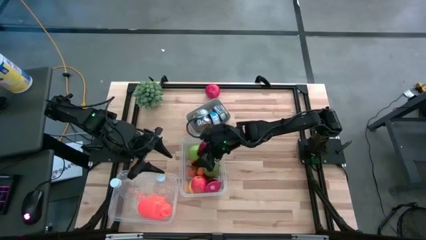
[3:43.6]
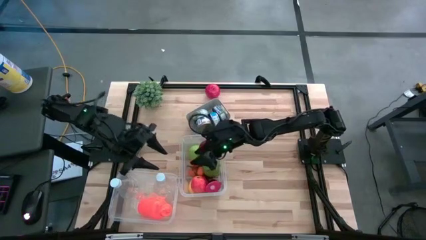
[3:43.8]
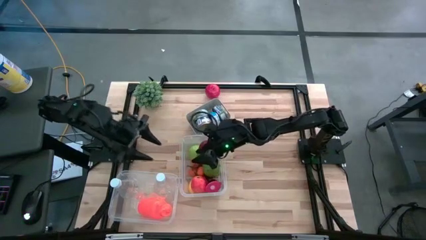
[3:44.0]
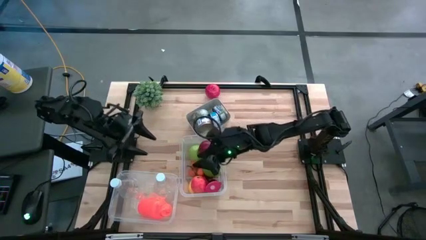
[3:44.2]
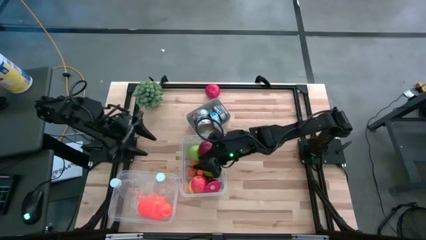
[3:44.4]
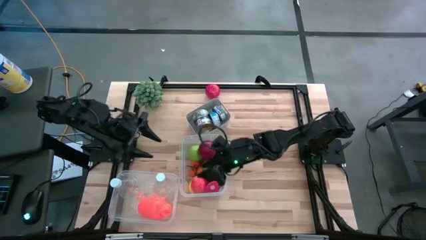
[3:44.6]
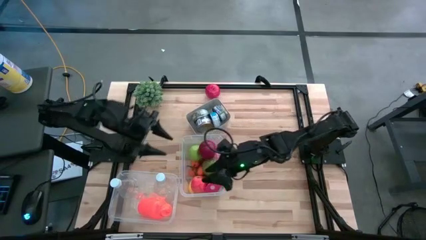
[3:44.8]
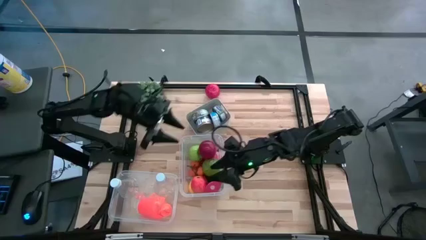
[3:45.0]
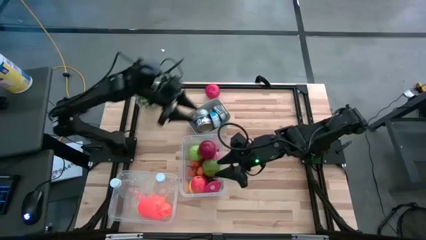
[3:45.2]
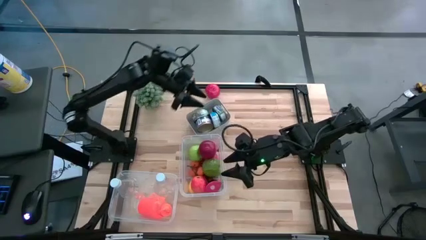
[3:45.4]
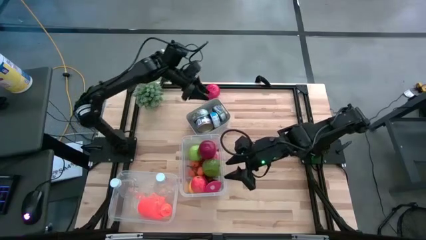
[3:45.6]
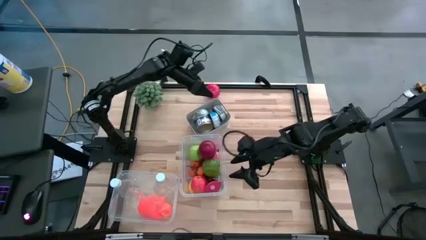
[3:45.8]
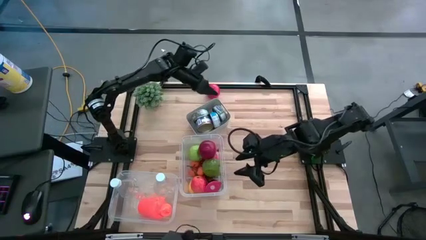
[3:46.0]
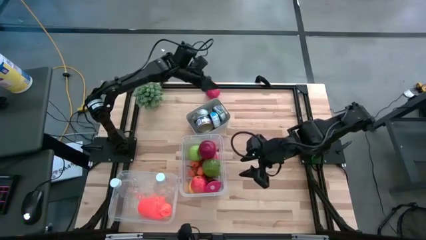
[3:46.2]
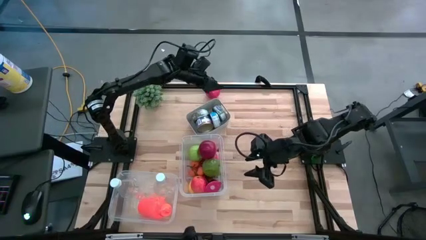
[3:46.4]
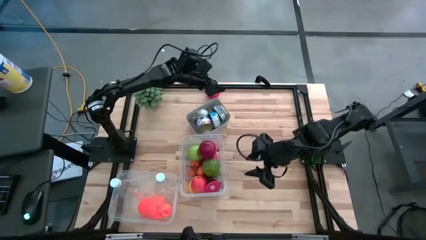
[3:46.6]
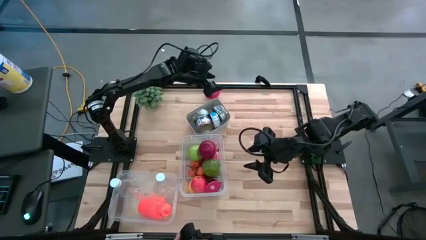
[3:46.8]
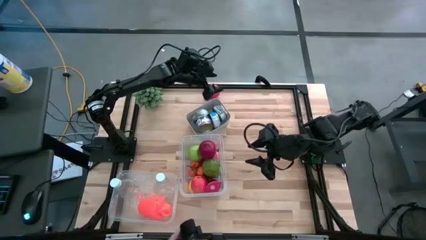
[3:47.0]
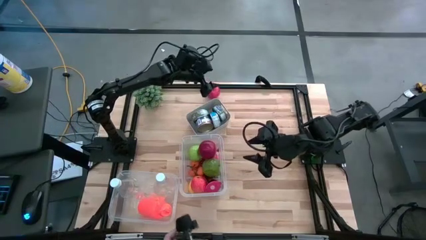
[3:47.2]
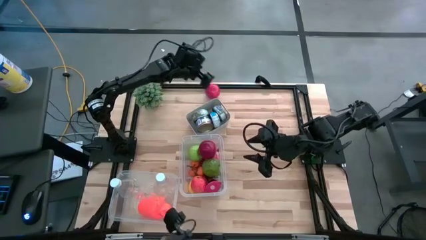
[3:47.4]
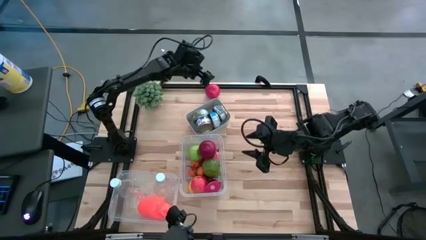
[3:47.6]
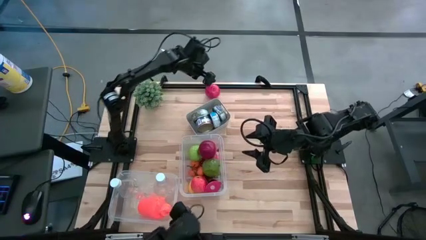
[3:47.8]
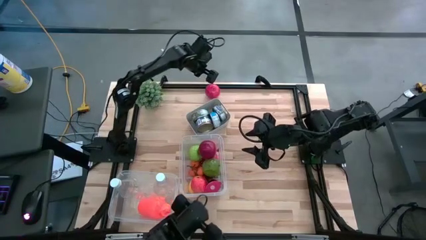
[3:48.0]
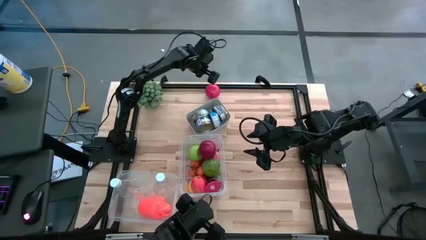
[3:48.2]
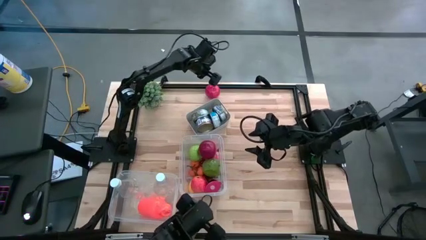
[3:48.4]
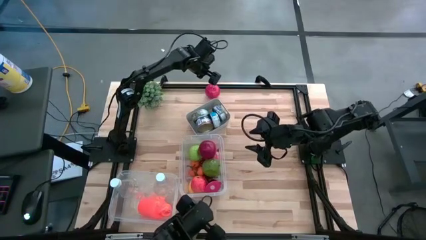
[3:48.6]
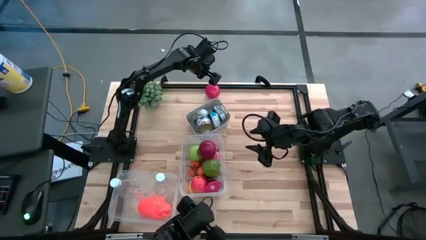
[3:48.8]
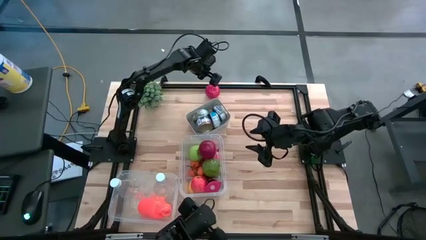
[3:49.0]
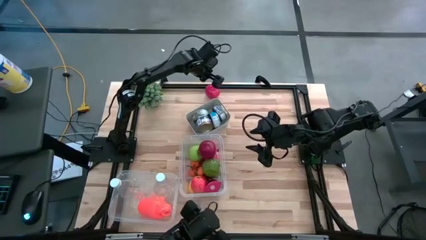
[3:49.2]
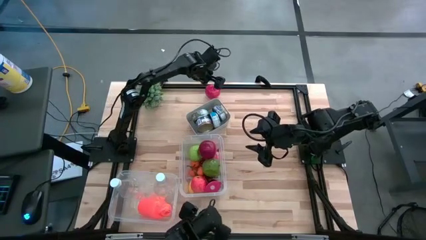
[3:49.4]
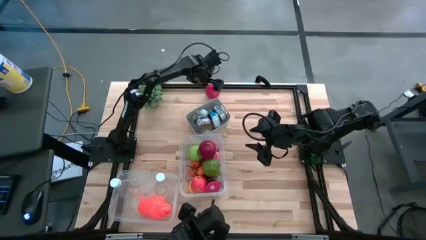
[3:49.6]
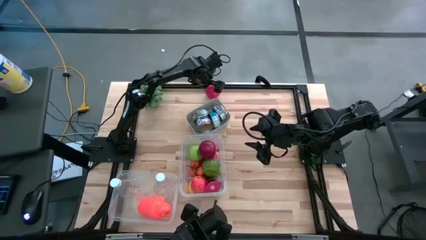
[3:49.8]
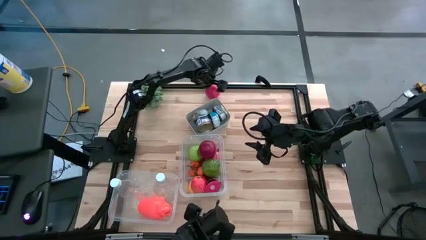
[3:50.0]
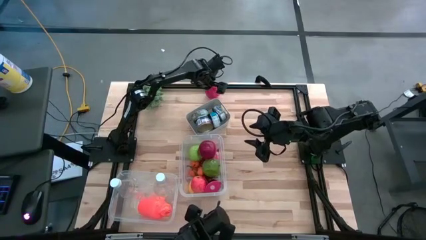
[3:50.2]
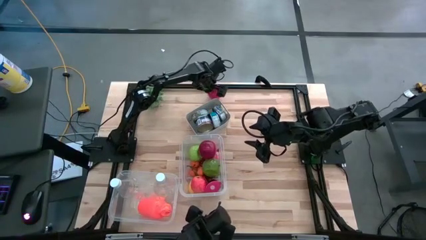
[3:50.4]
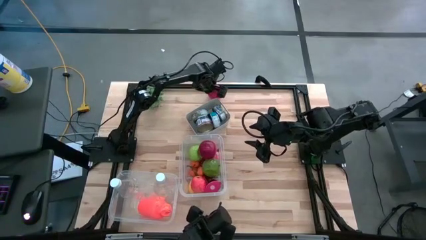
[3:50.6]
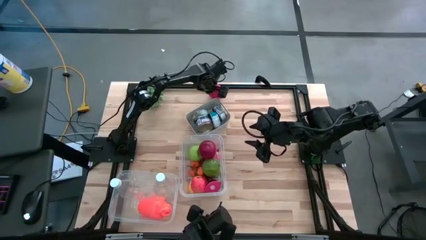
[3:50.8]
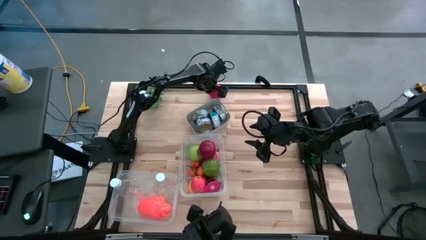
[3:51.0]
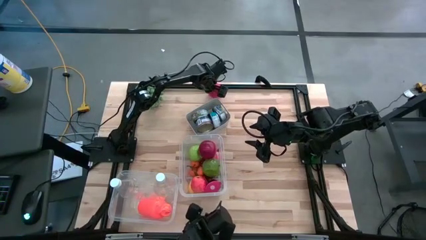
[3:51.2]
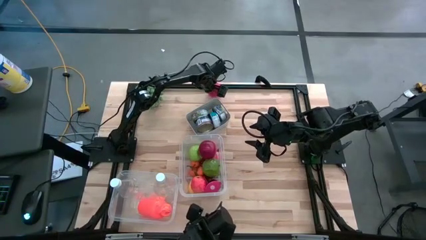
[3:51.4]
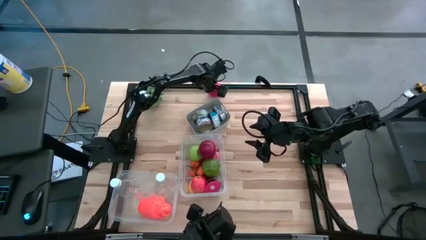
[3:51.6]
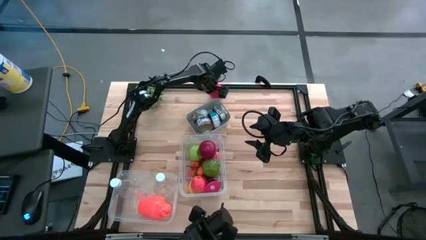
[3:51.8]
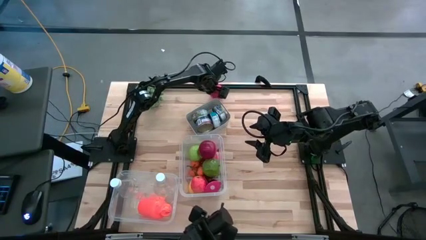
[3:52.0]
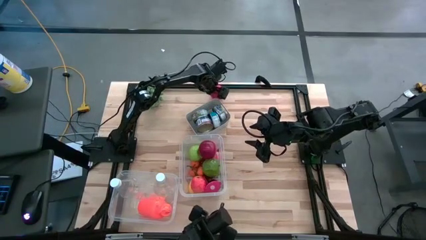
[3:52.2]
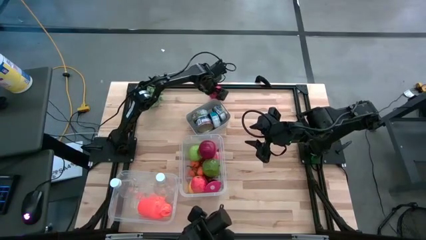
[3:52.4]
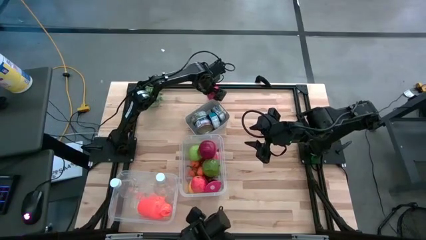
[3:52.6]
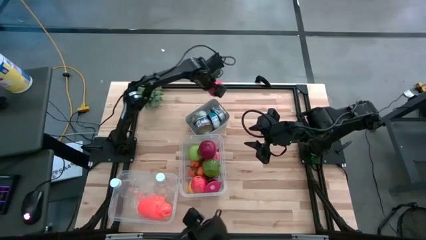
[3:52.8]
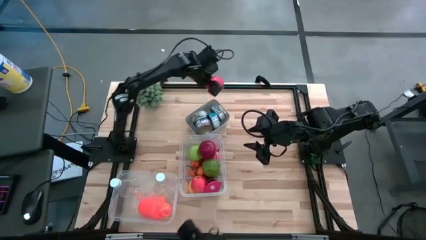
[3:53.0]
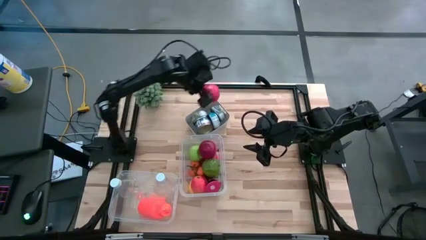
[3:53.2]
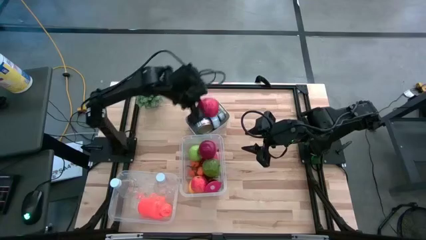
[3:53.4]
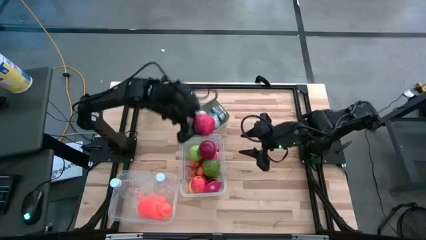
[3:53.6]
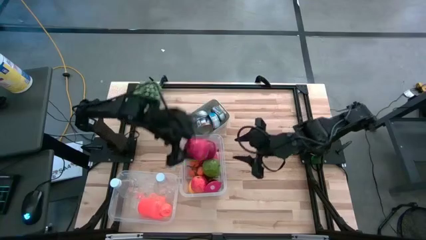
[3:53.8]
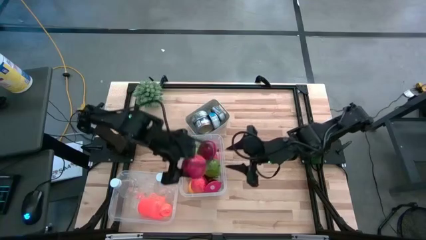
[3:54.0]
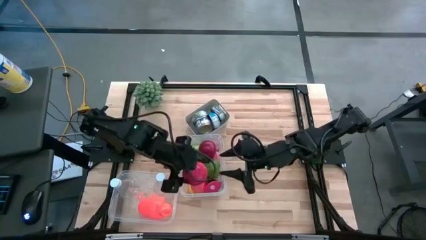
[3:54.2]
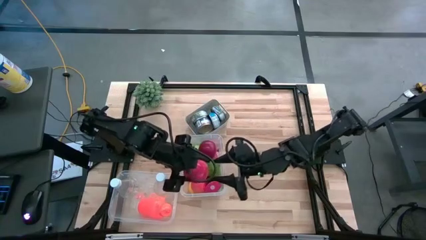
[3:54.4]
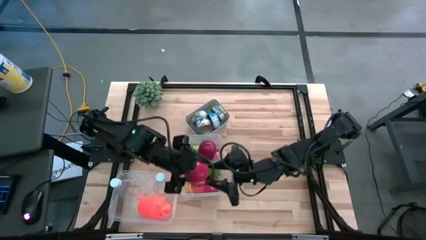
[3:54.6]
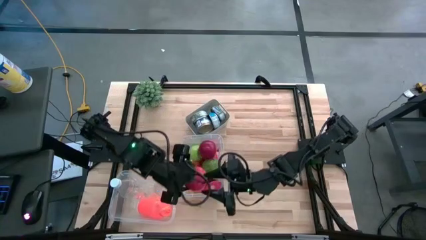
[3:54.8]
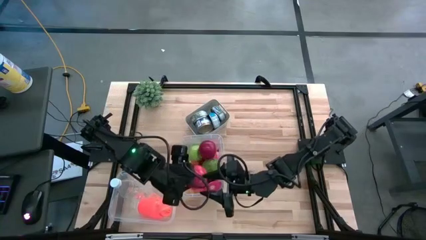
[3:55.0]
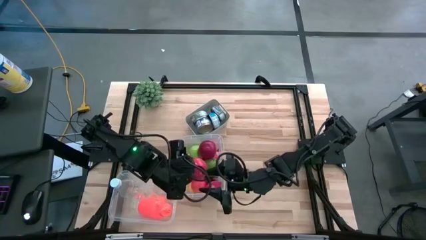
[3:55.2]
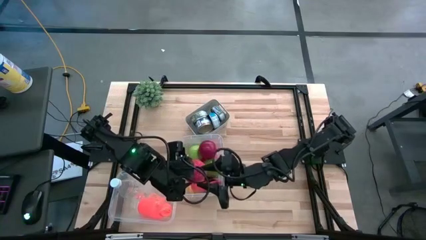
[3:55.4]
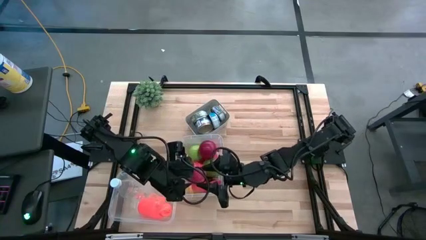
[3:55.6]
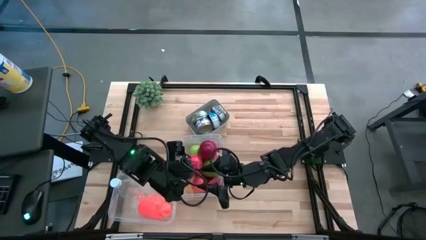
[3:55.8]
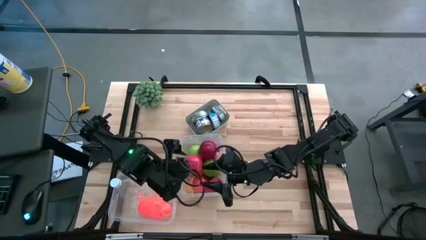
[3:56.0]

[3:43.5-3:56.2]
Task: Pick & Place Food Item
Put the red apple into the right transparent bin

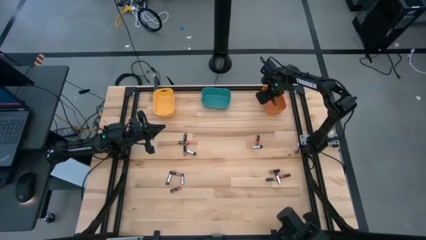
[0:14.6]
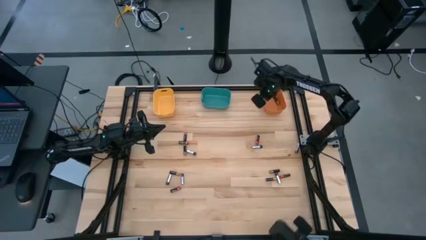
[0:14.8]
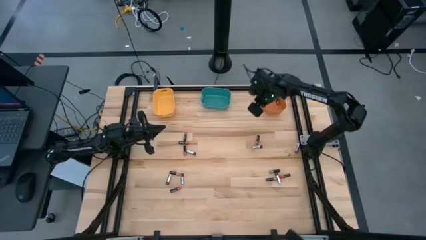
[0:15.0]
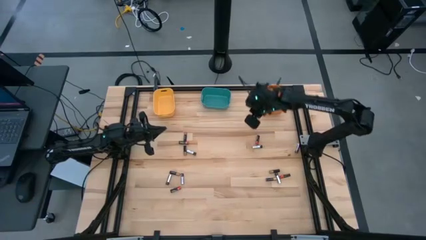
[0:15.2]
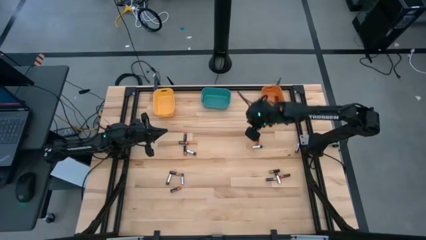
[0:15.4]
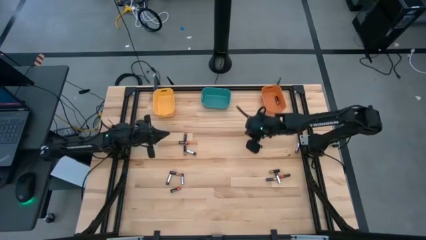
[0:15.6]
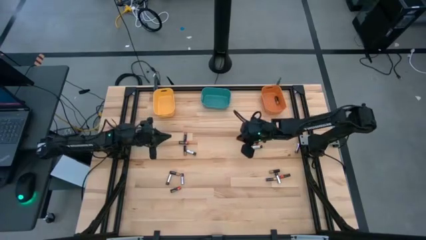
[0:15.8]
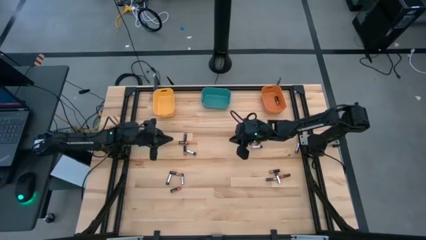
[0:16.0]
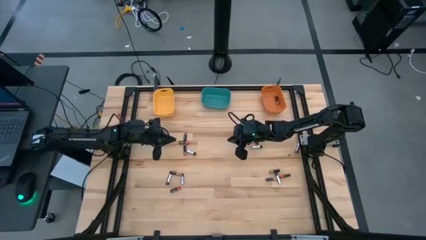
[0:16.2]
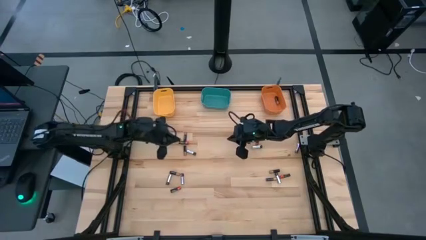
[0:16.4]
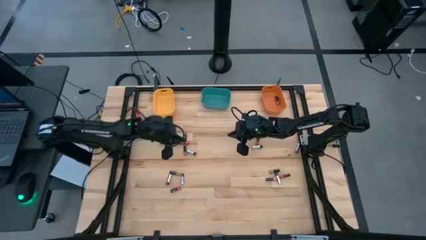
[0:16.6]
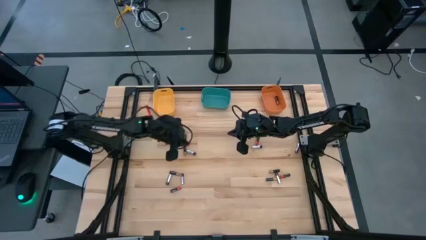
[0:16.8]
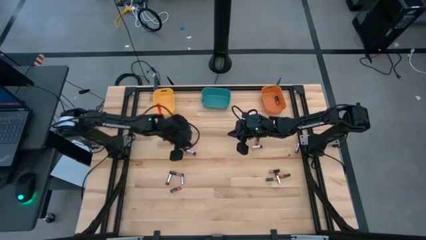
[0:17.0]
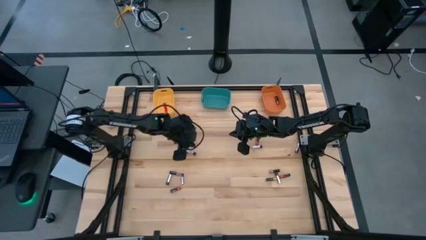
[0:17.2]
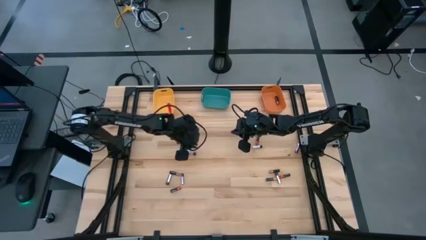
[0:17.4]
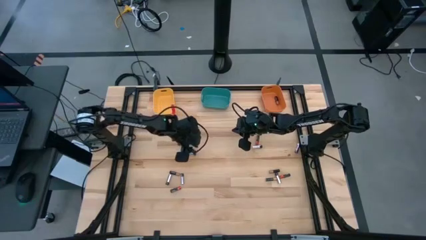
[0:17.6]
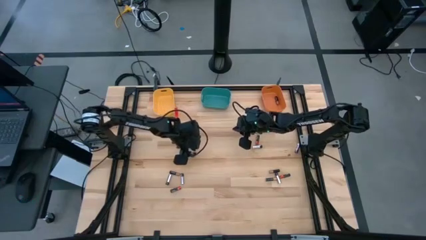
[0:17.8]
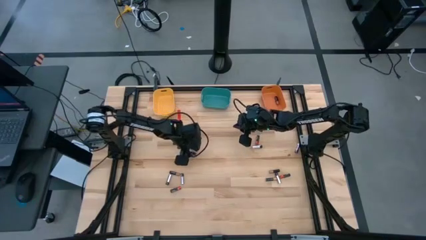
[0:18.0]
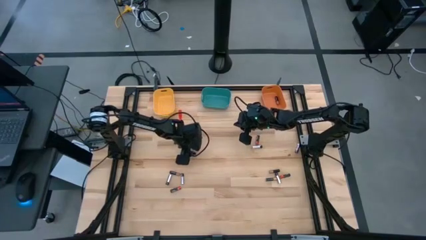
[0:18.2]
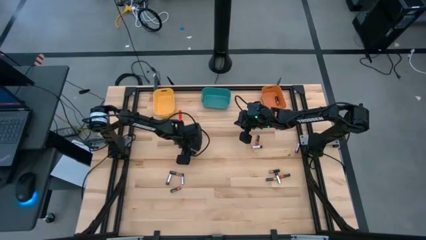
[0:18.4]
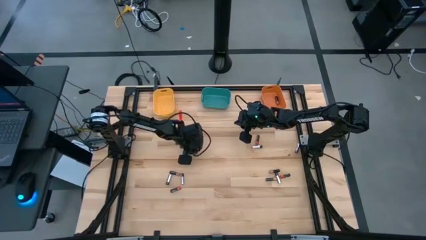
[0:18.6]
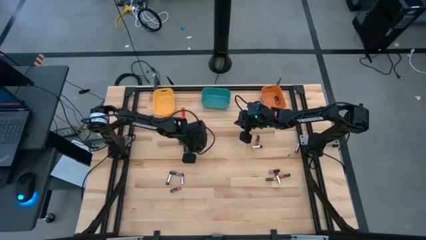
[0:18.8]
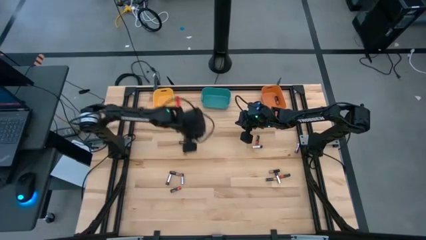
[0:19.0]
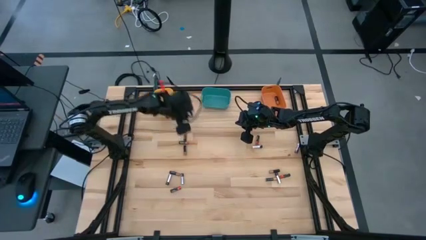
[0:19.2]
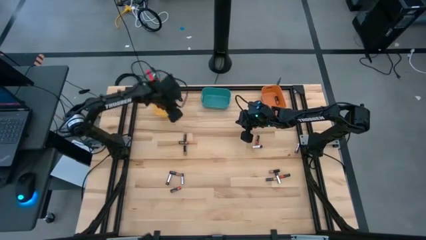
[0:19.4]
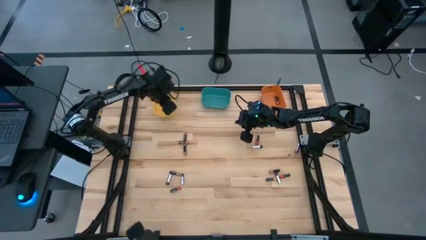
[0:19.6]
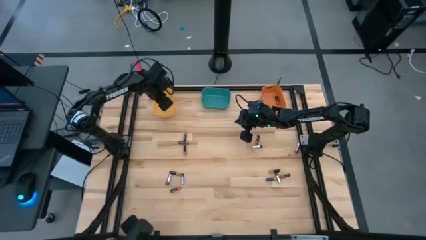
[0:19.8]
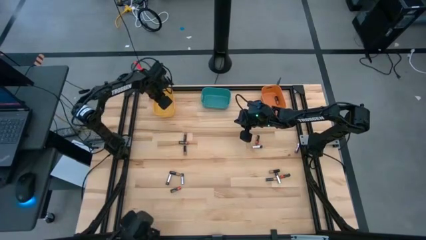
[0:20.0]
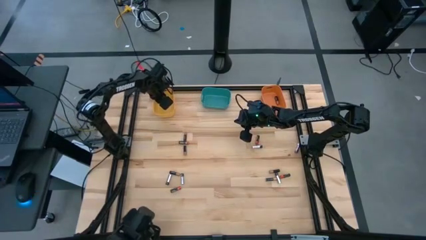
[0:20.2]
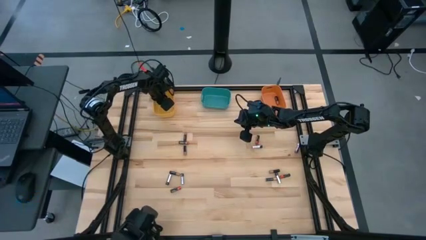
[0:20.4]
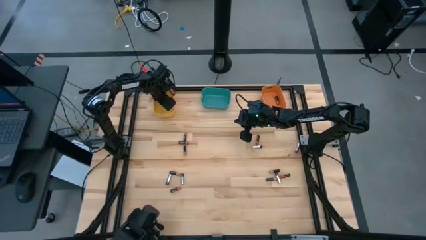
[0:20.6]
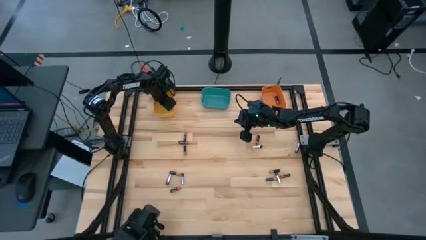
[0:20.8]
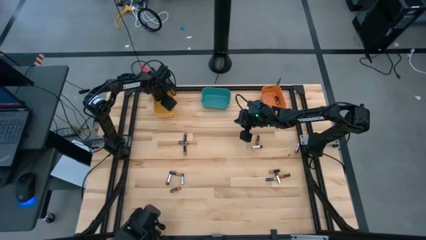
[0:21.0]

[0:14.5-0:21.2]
Task: Sort batteries
Put the silver battery into the yellow bin
